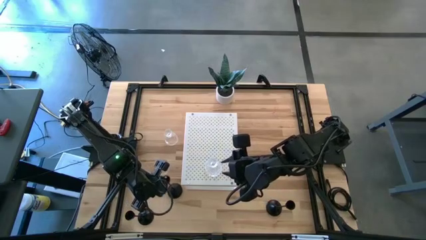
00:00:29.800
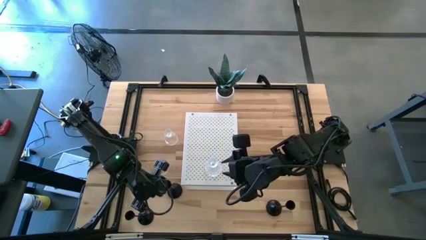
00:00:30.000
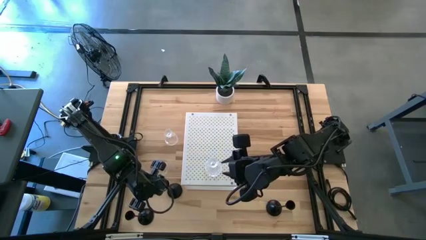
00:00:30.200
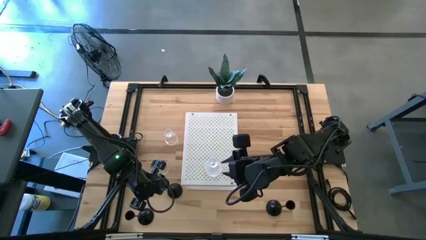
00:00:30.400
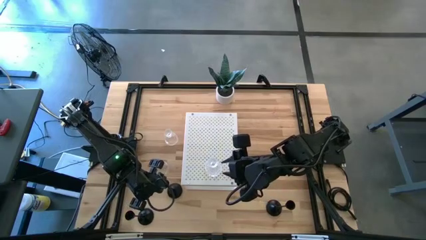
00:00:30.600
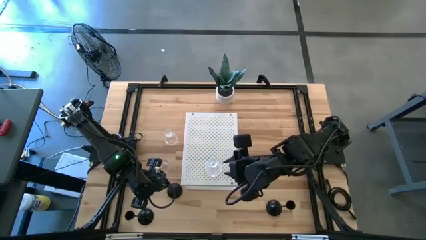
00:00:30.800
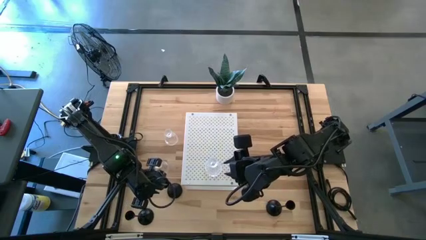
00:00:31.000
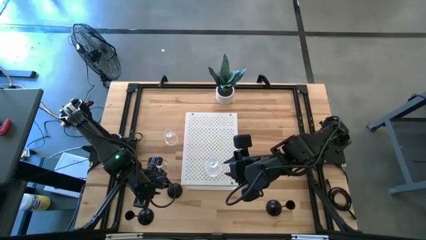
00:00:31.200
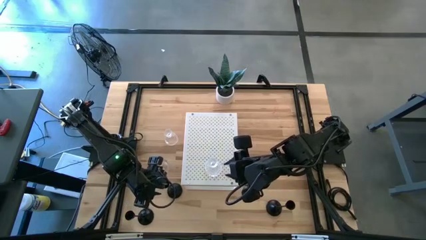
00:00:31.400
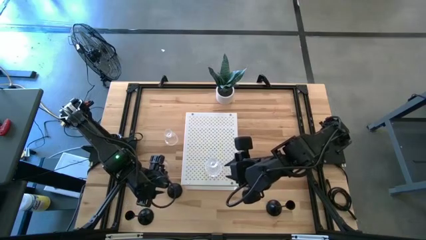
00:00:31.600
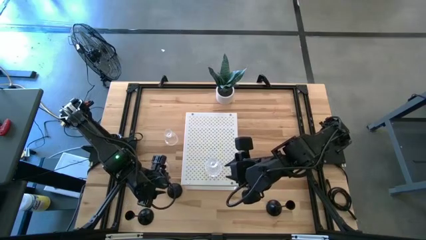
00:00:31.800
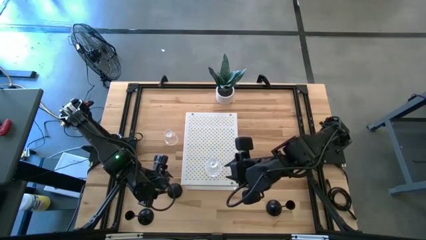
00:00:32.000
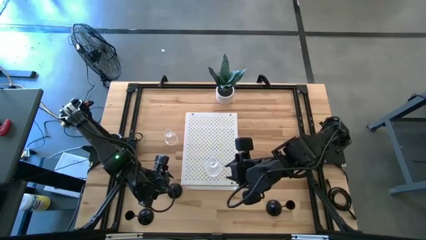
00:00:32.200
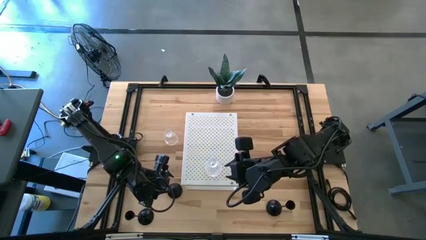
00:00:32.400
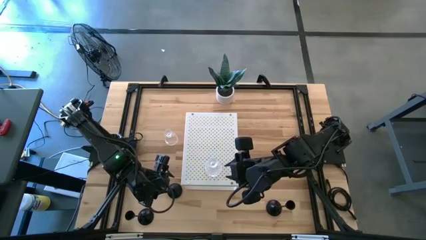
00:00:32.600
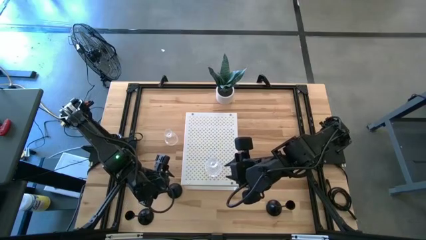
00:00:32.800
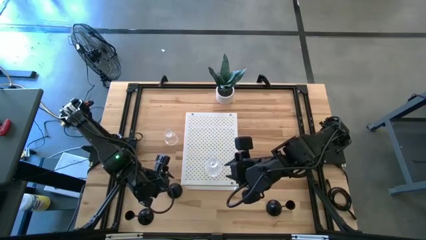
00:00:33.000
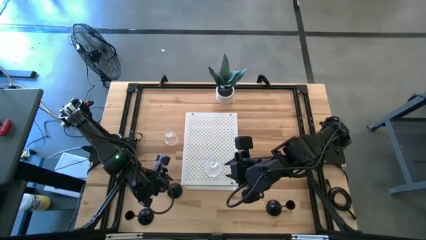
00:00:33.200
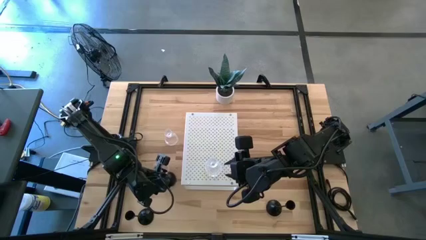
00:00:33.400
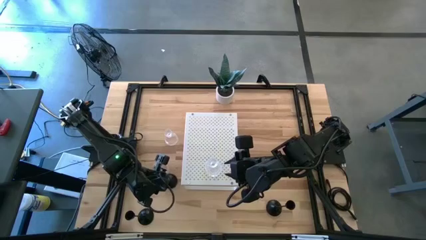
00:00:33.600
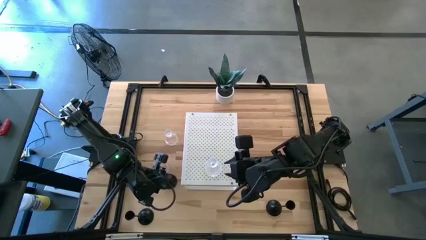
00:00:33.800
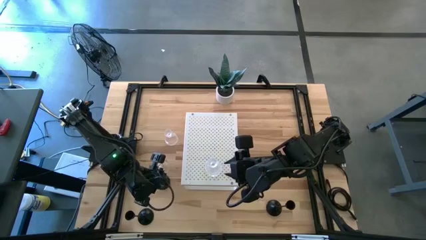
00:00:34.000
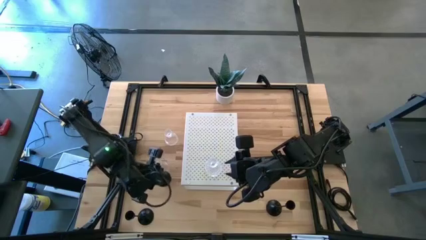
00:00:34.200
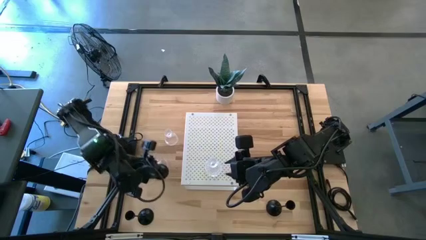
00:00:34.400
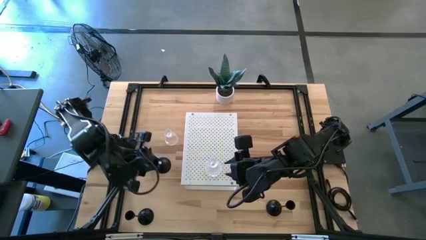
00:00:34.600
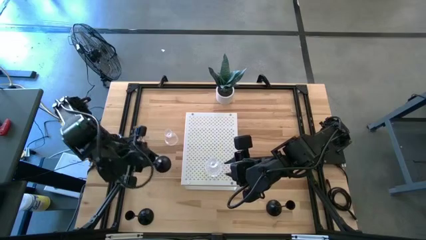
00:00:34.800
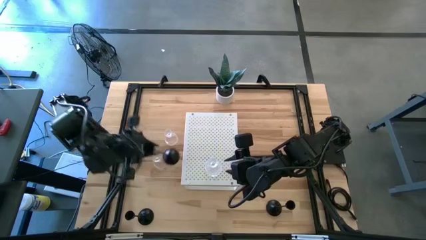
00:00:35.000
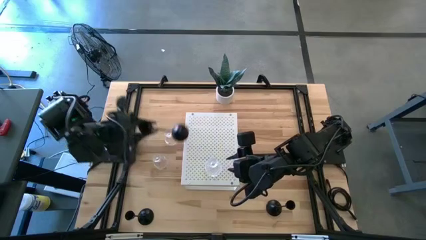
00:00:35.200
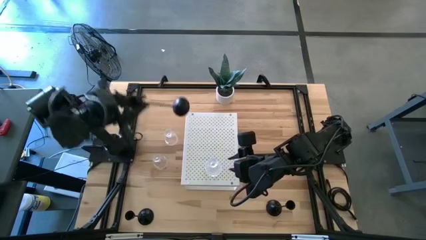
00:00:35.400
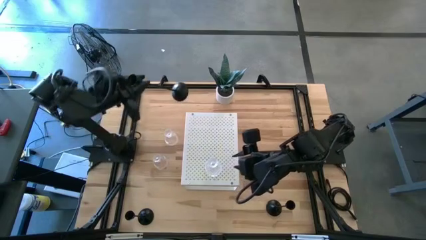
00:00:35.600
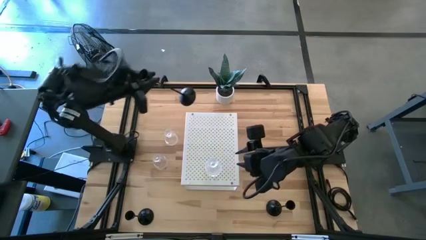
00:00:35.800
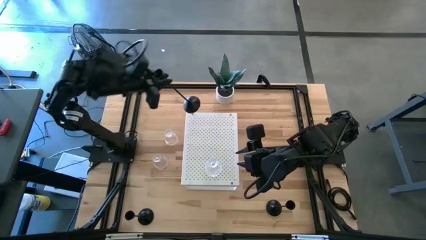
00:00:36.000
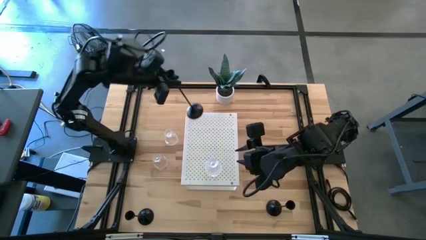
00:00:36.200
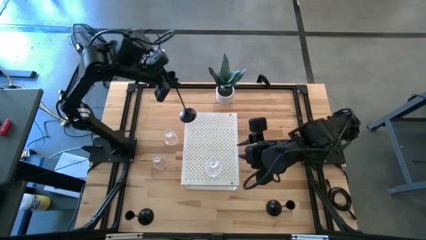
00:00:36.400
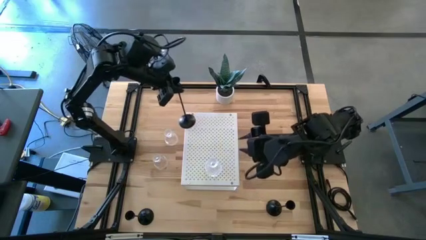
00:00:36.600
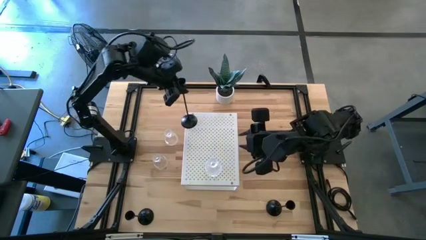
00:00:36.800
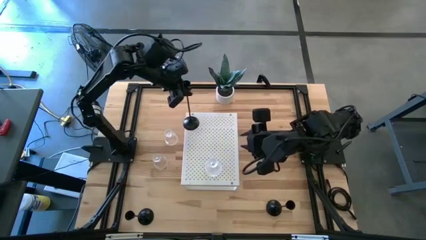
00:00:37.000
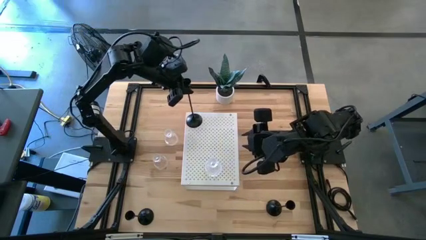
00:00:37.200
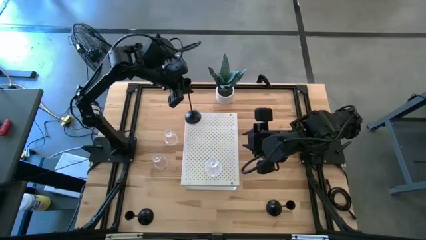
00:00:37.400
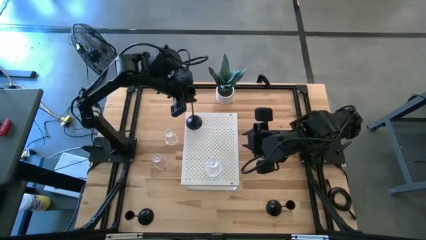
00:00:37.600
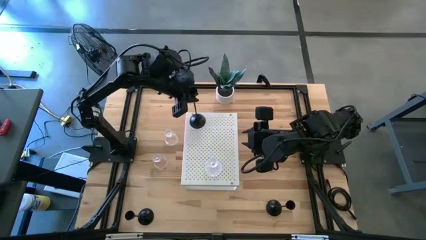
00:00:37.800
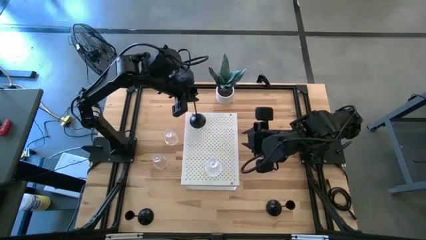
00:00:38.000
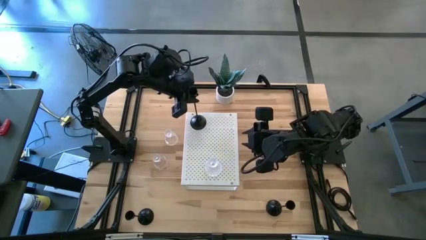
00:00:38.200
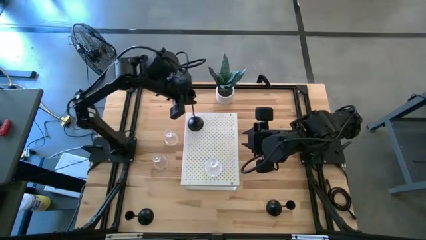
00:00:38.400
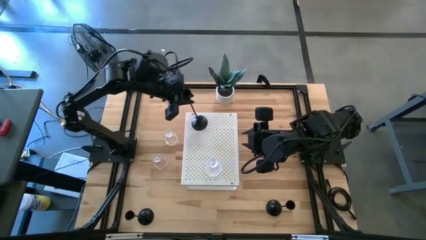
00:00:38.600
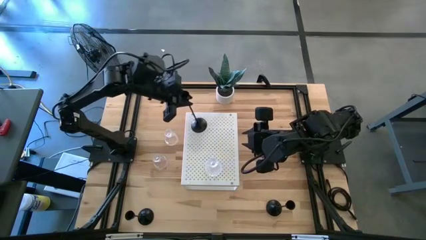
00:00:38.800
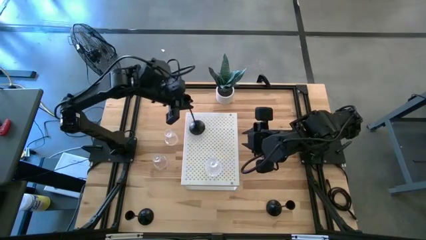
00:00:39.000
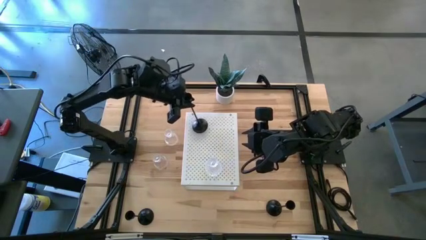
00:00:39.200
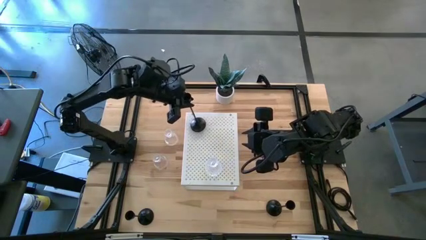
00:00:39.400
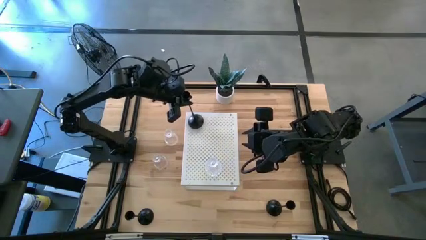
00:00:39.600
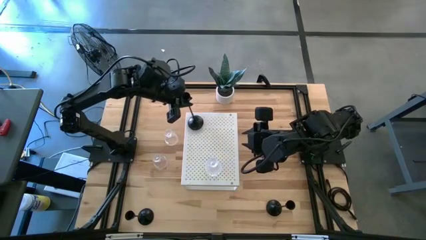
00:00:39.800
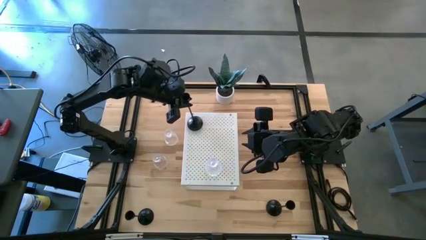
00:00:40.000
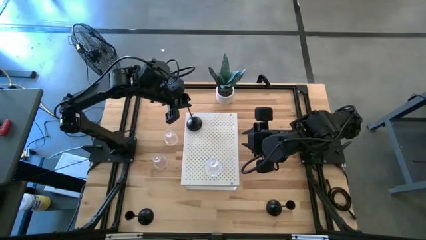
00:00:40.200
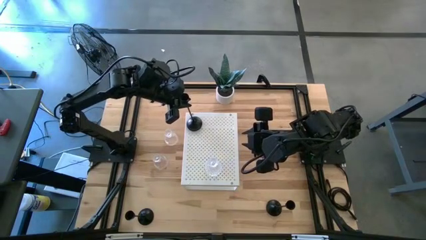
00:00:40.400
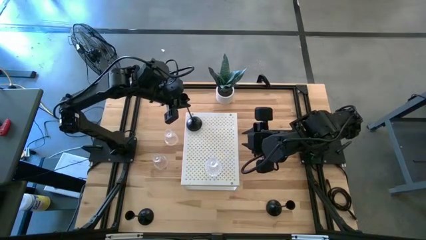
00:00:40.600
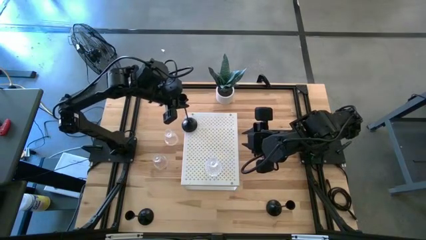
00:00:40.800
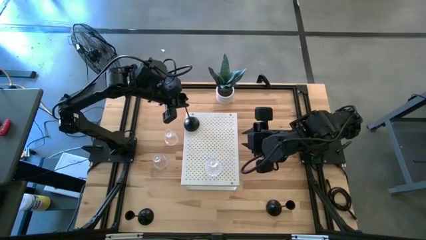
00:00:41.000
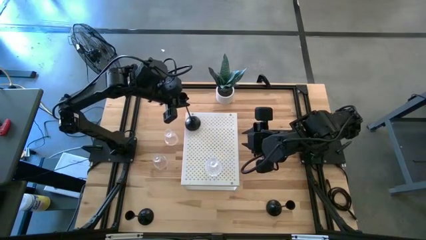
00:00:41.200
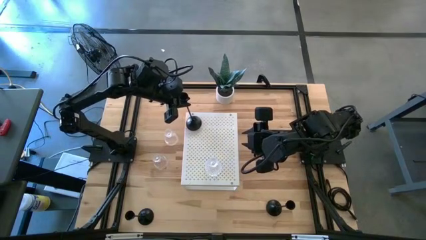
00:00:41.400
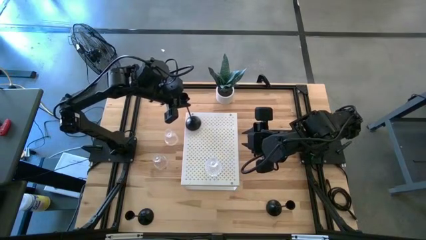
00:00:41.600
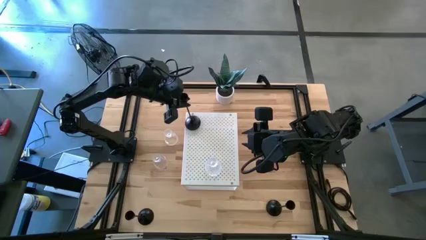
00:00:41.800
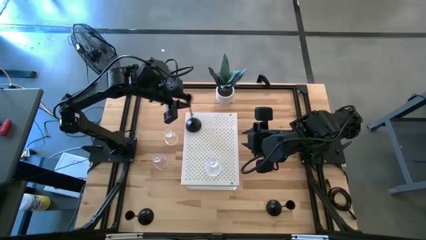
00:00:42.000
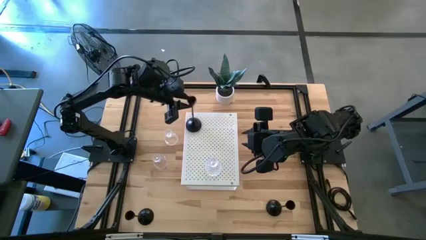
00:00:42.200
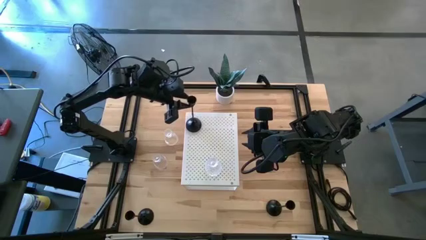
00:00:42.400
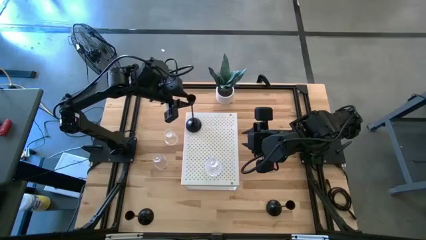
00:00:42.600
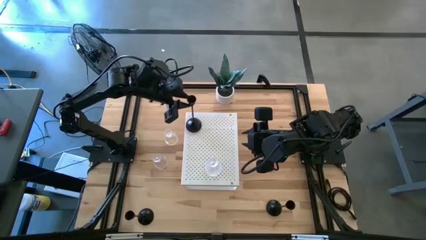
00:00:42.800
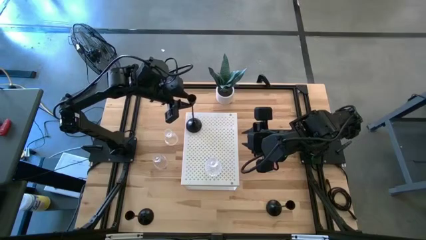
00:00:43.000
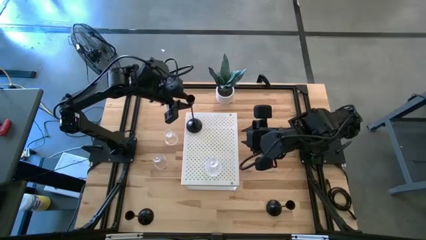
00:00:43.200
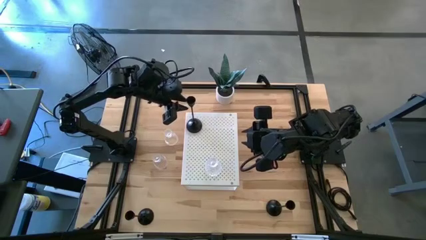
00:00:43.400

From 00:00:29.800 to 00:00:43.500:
Task: Pick & Place candle stick holders
Put the top black candle holder on the shelf

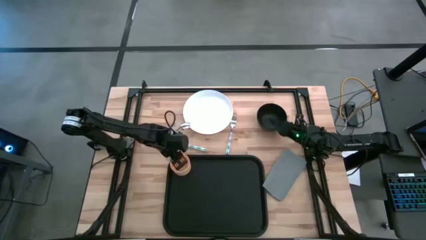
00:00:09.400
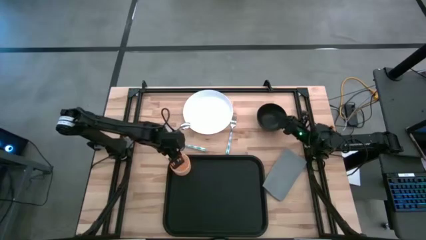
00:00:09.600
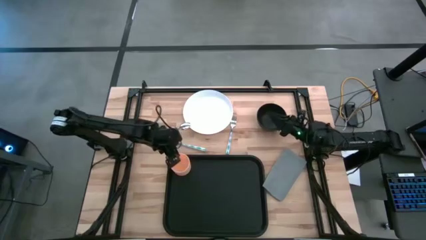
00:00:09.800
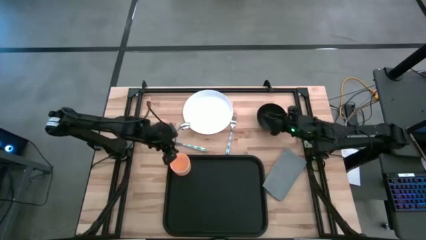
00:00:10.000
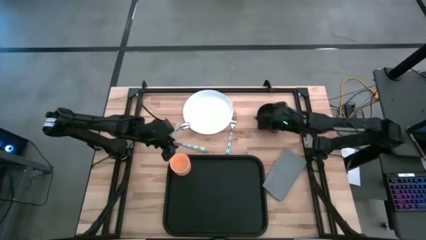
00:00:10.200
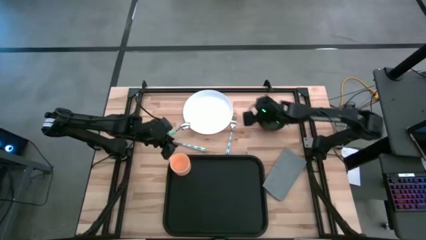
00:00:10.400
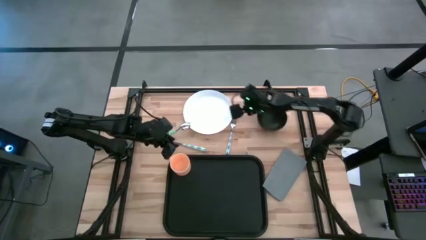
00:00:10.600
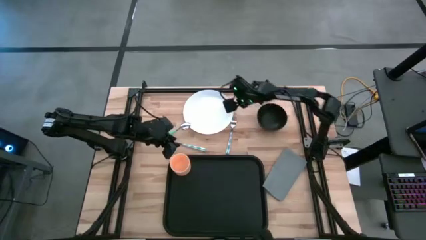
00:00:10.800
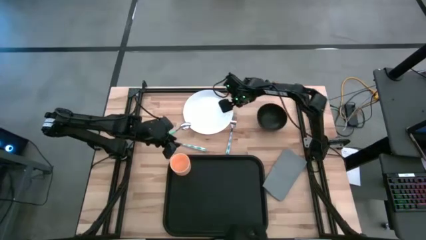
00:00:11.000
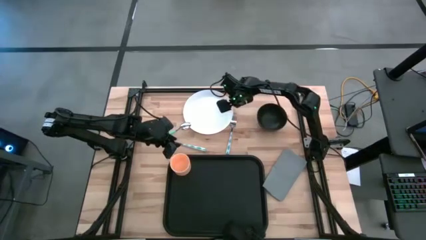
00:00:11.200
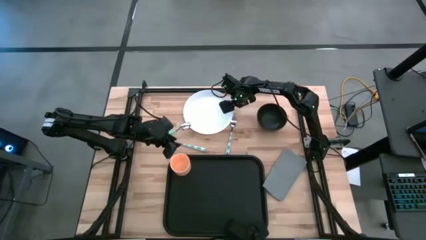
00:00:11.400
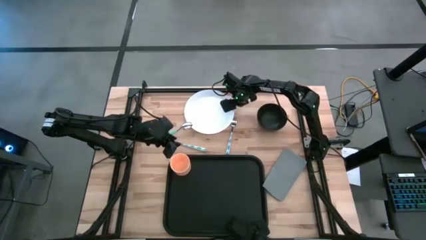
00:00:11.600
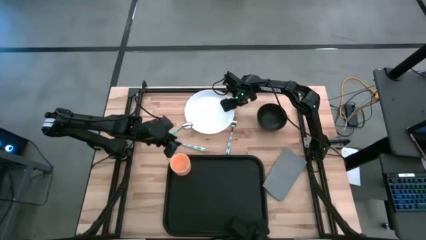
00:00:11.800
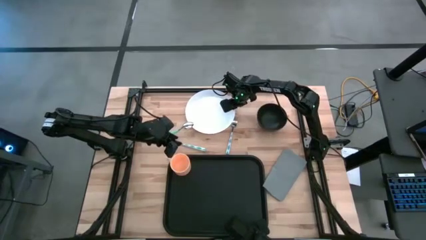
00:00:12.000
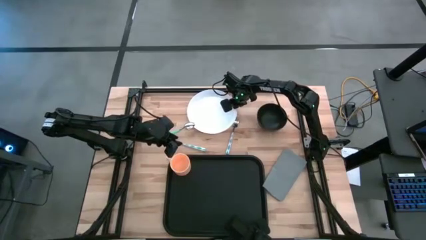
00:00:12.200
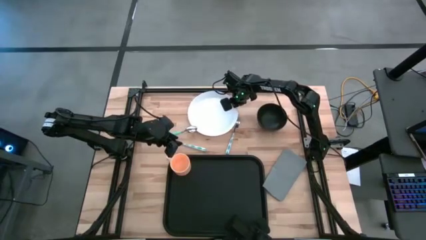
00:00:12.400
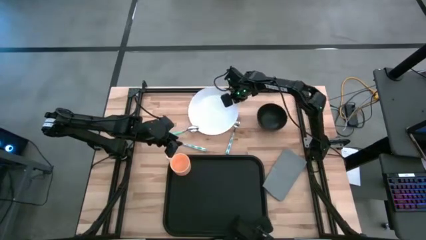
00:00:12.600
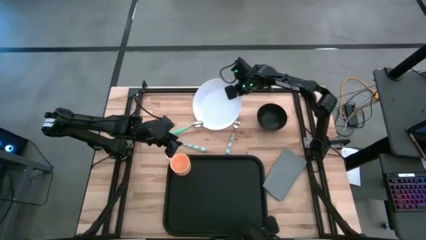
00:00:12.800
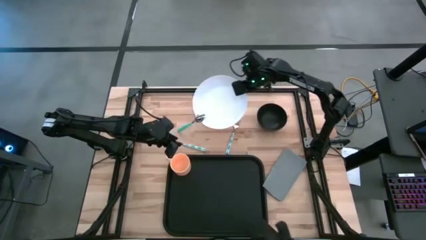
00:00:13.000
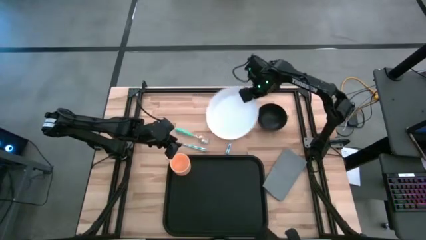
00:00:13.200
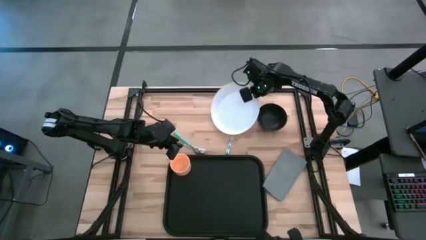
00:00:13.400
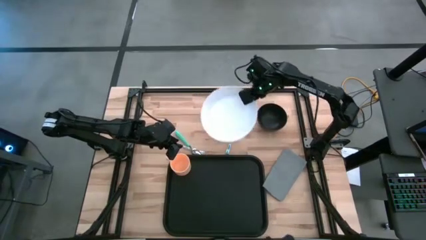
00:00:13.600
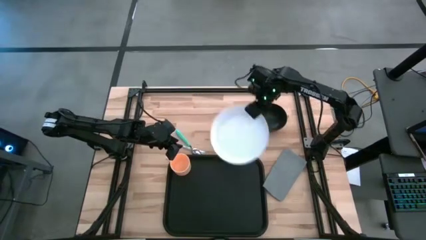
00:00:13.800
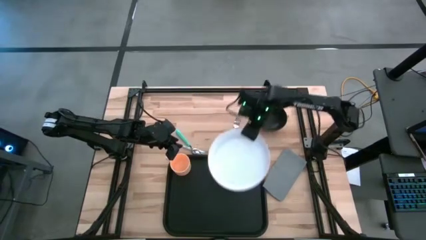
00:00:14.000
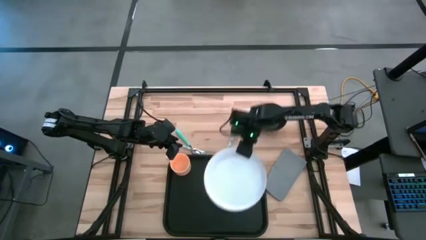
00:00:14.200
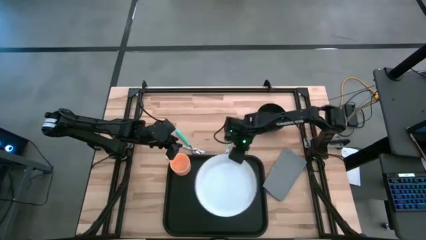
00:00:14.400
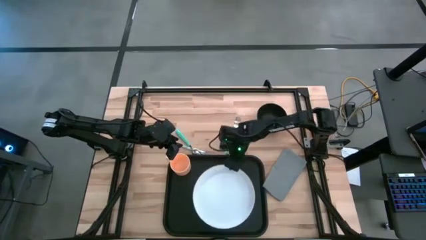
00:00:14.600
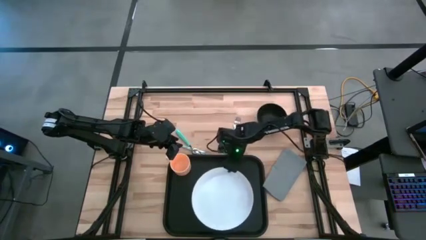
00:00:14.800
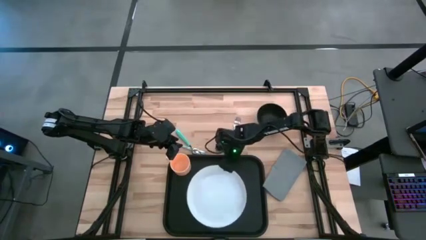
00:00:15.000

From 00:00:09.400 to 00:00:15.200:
Task: Set up tray
Put the white plate to the bottom right of the orange mug on the black tray
